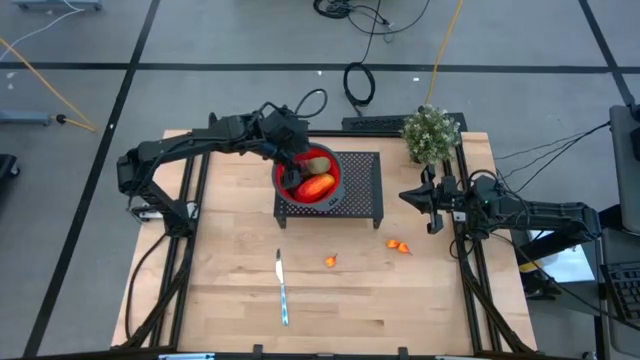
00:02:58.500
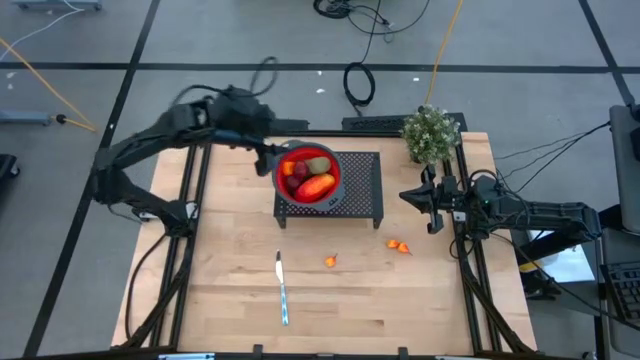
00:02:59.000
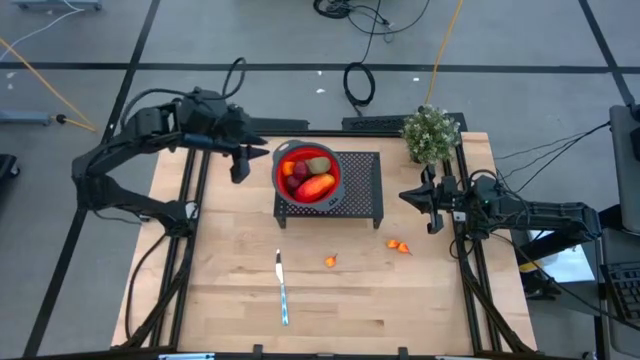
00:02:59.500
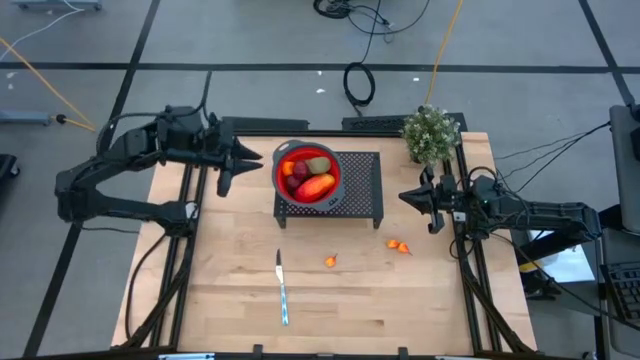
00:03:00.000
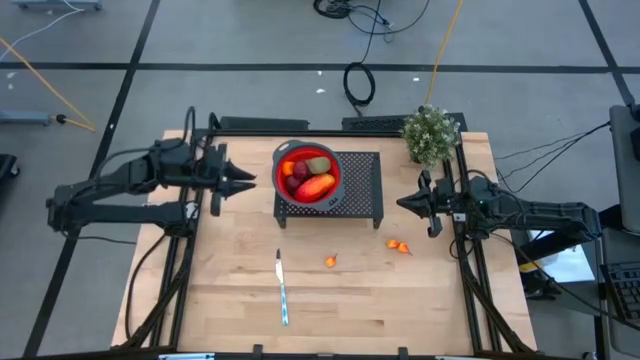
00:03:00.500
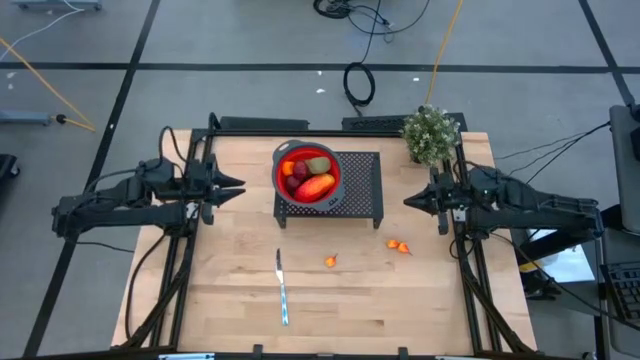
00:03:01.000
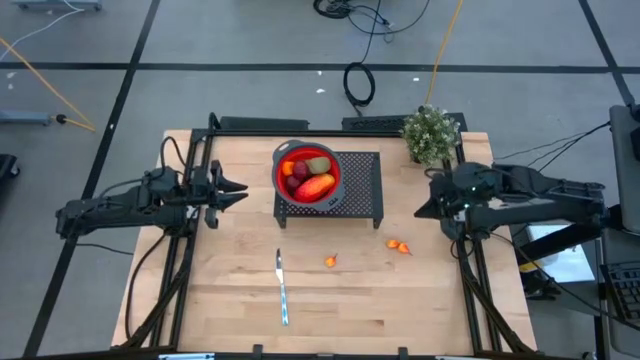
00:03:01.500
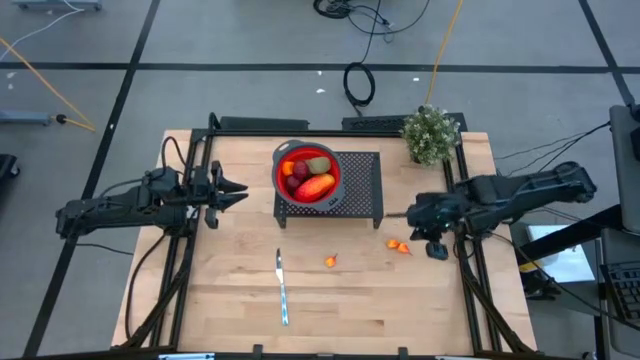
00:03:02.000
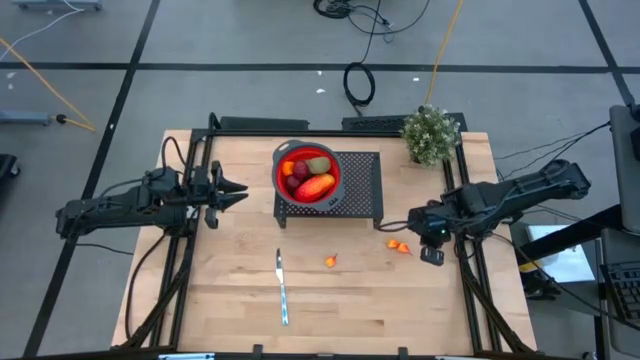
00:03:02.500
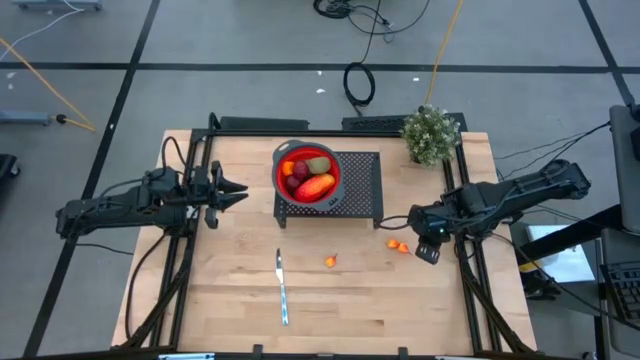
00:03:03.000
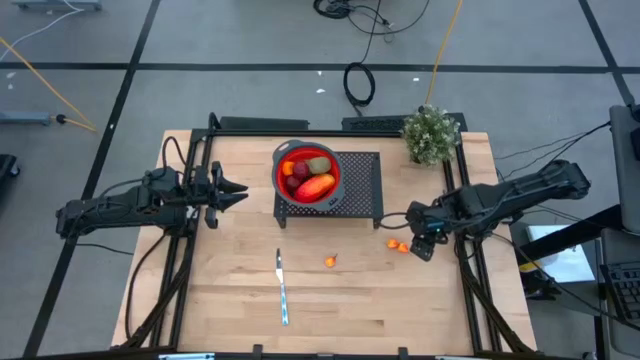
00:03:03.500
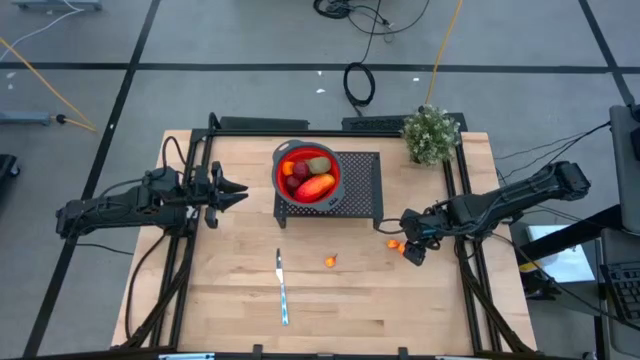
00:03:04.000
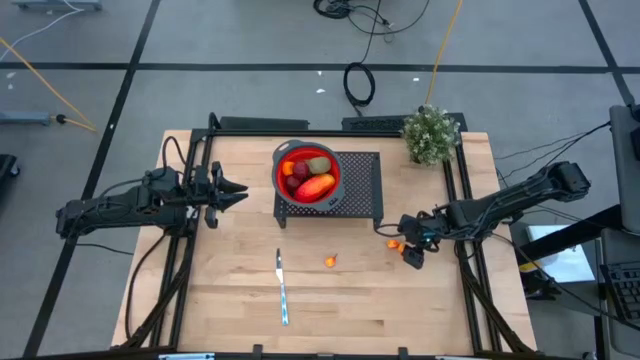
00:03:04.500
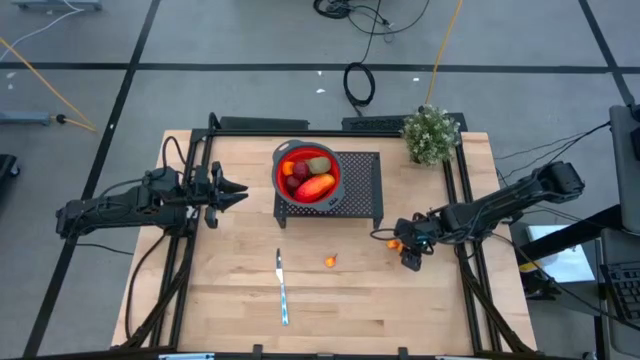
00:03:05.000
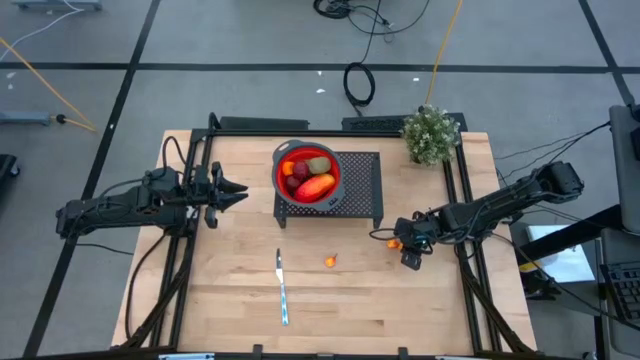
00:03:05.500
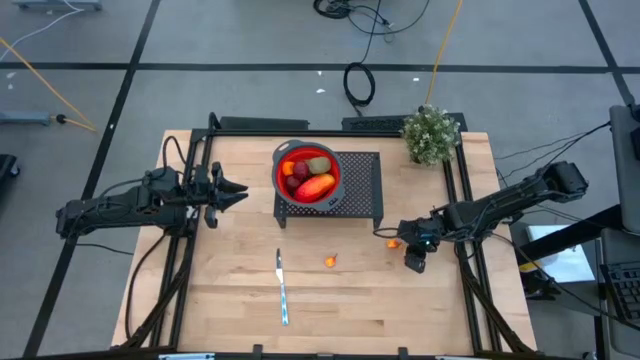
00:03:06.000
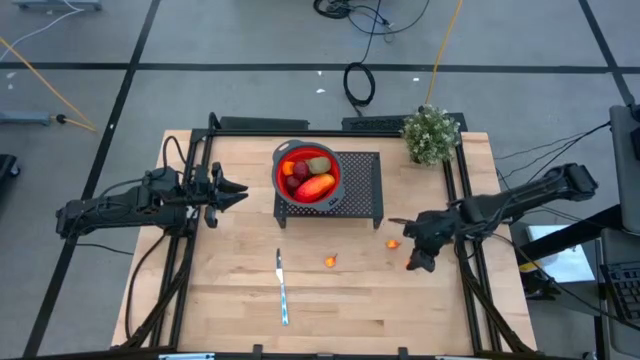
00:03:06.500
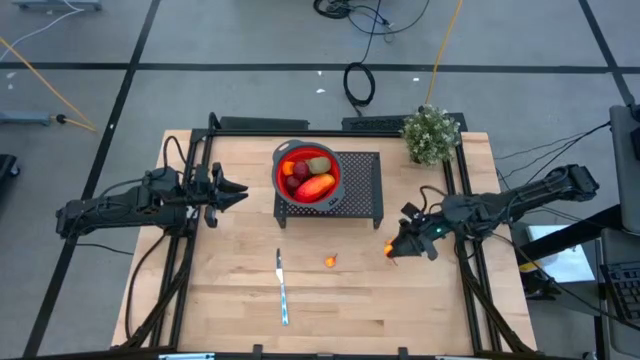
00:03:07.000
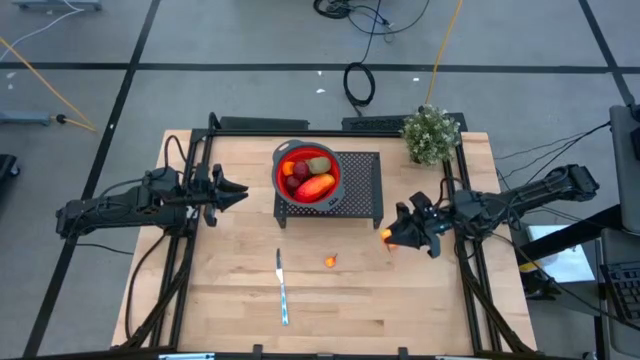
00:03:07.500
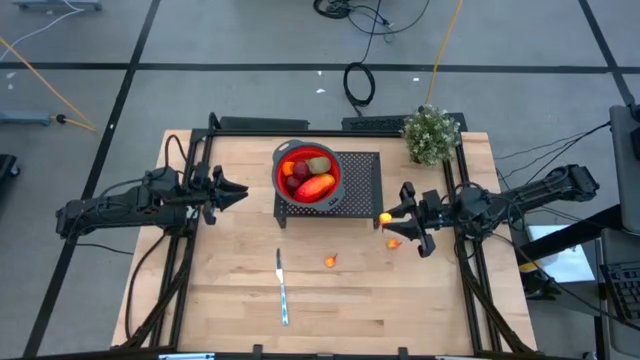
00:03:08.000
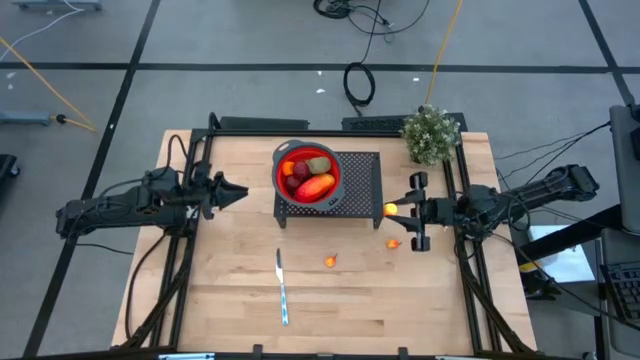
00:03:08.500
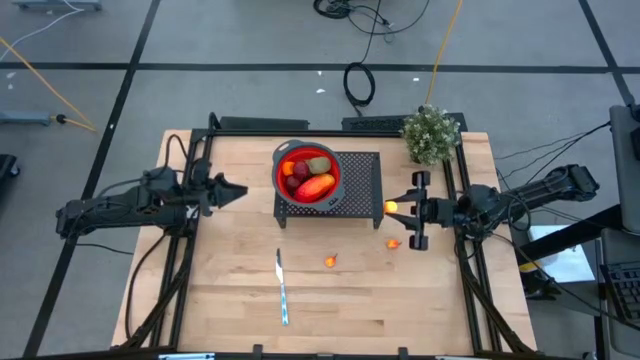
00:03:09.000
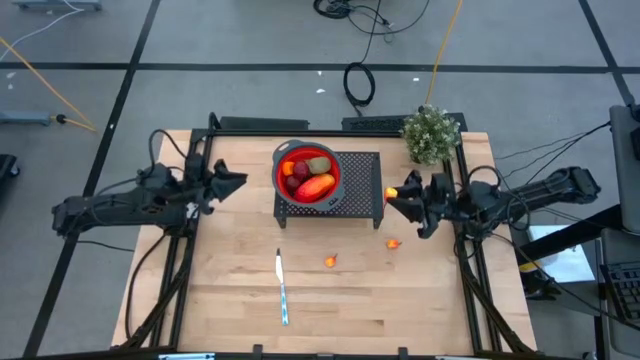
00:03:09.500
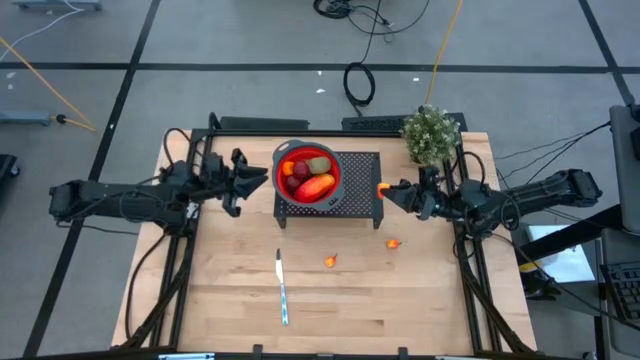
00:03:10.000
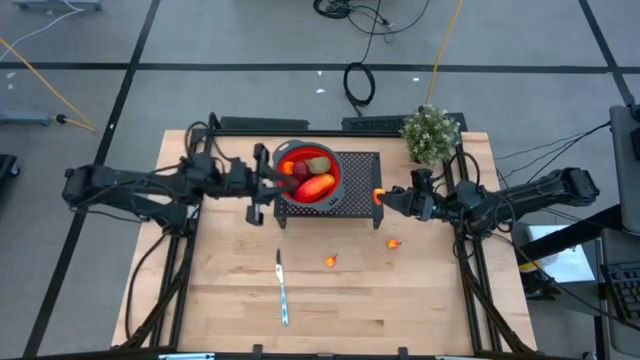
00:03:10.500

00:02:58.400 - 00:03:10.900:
Task: Pick & Place Fruit
Put the top right peach into the strainer on the shelf

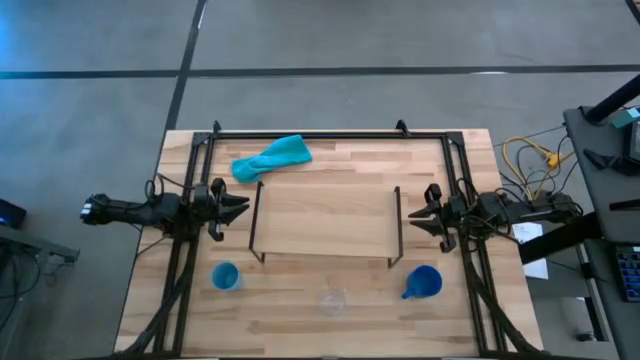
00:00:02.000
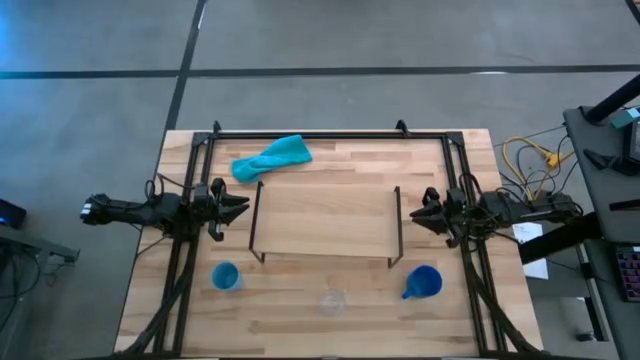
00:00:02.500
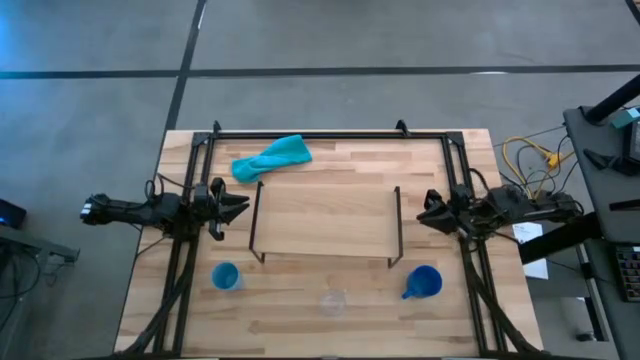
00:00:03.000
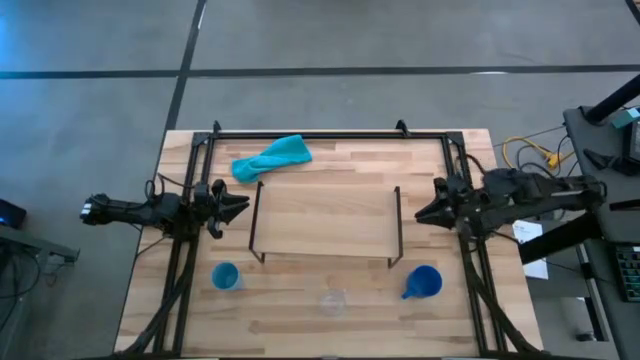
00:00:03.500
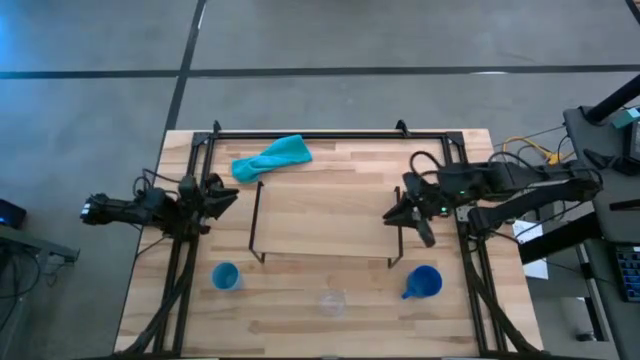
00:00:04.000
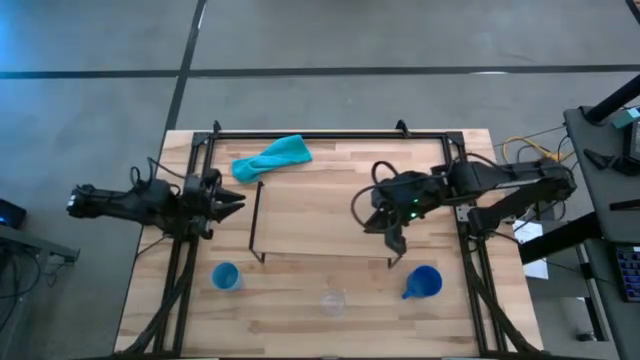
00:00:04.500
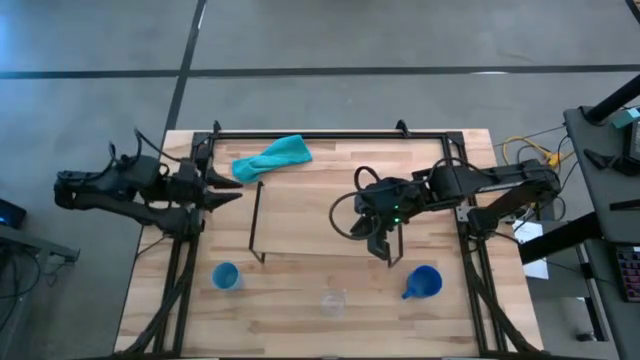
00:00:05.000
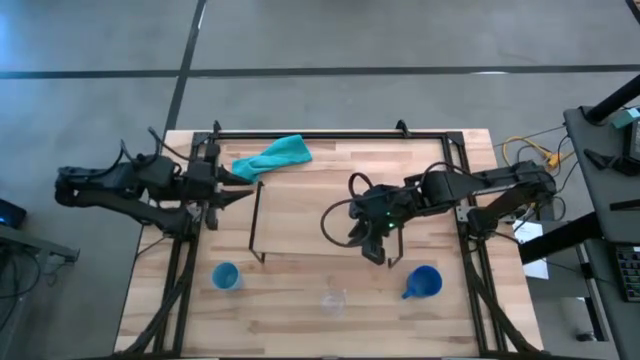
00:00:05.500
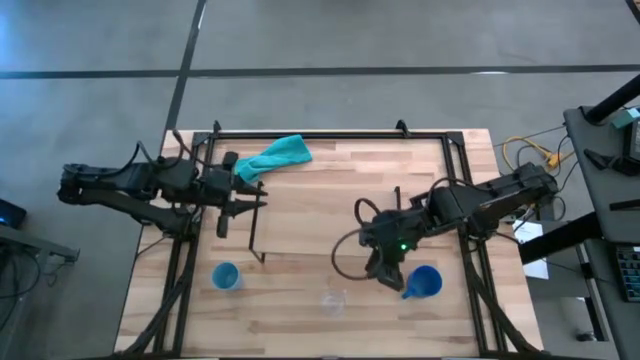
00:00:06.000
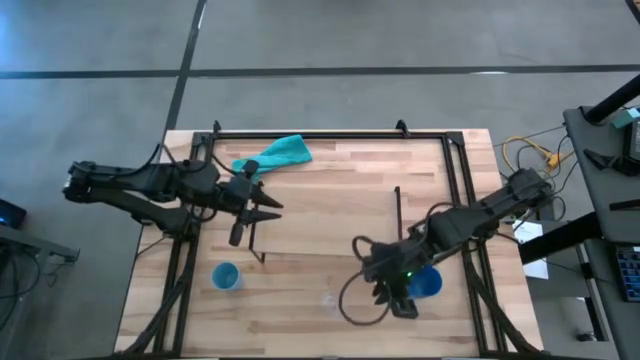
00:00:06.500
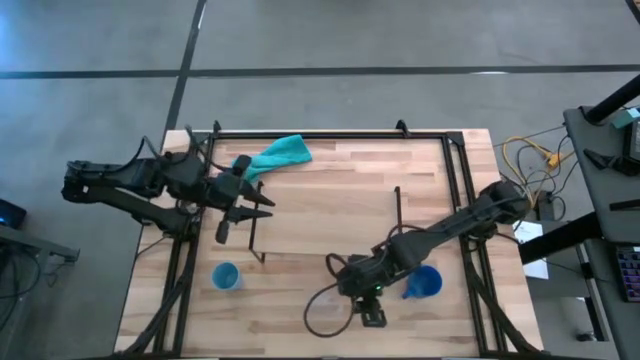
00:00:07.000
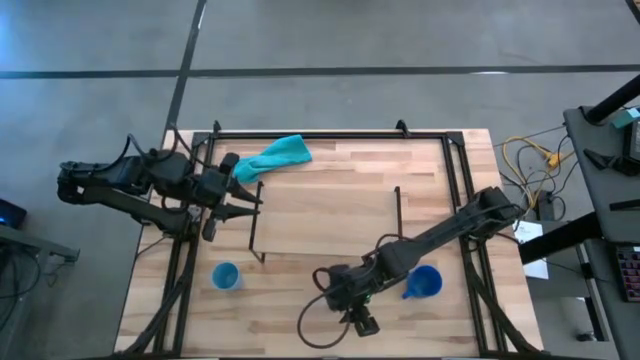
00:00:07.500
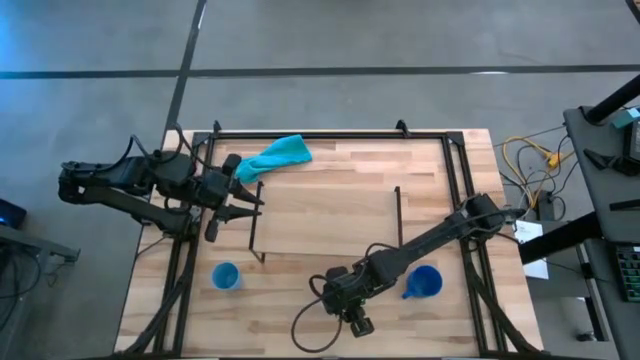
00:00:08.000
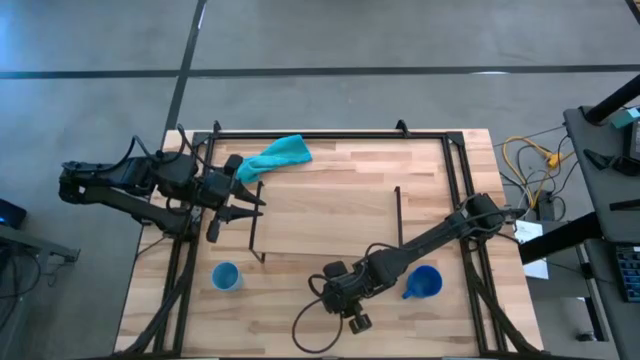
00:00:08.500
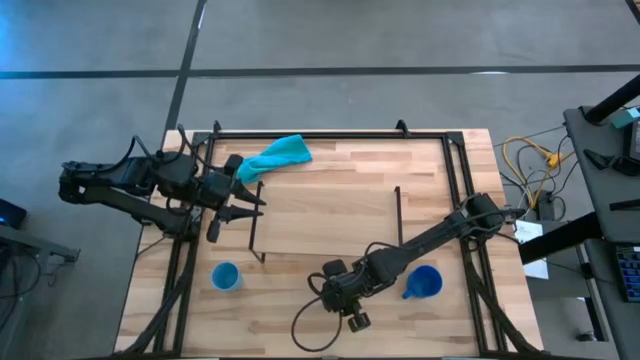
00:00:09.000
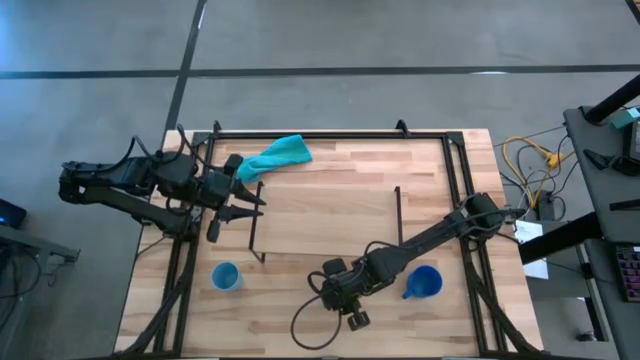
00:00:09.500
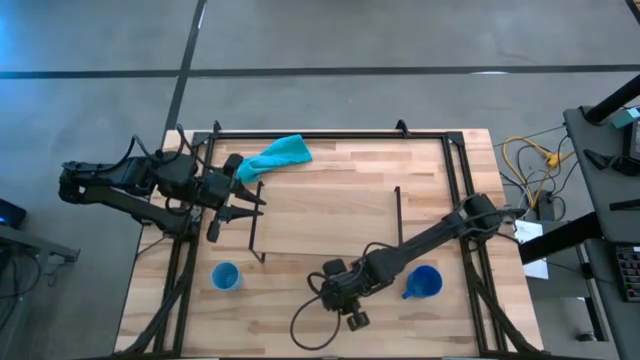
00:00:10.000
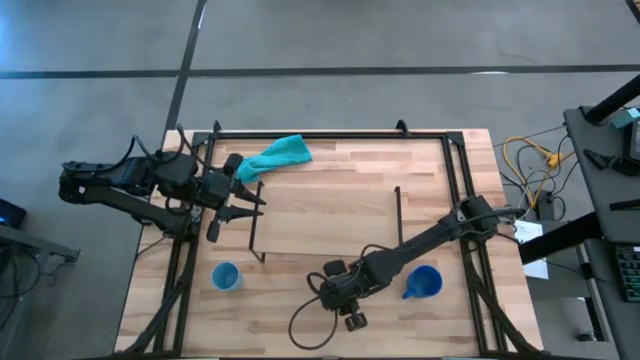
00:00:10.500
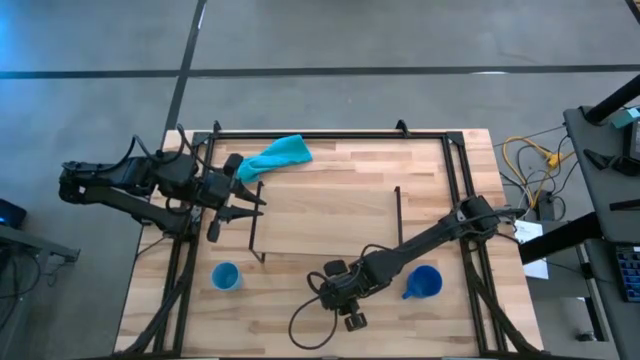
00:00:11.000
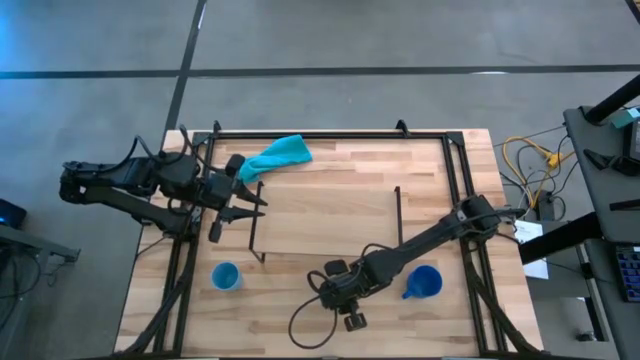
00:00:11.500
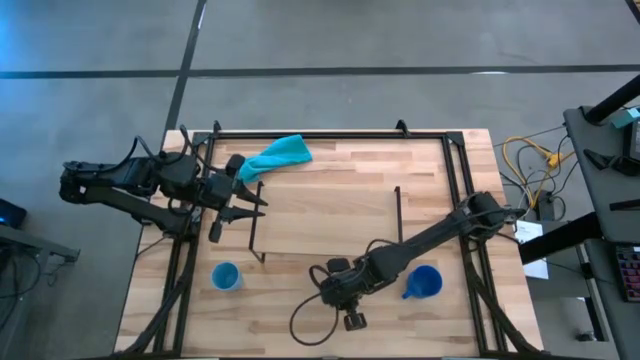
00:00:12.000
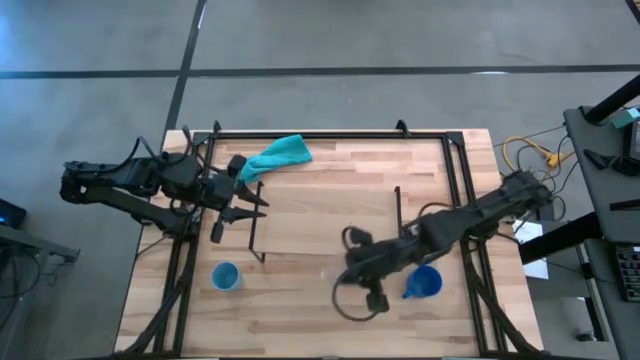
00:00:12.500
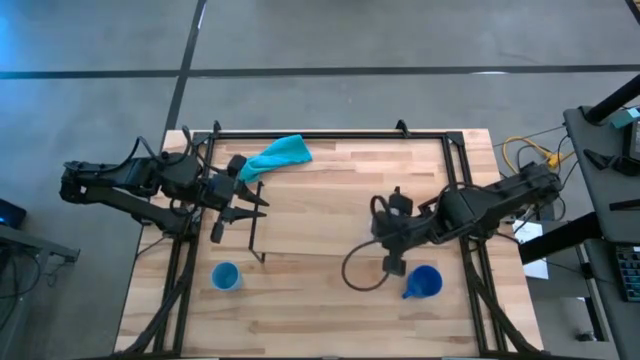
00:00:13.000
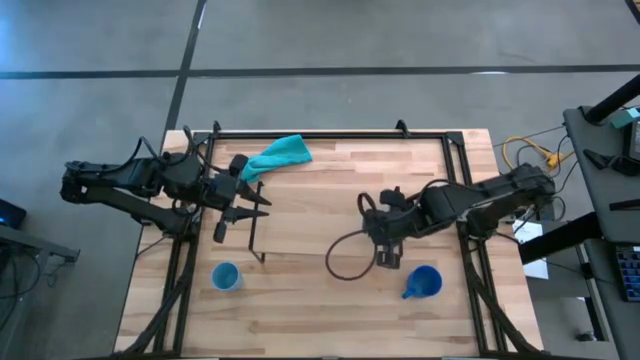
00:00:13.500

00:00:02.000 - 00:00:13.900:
Task: Stack small to large cups/mugs on shelf
Put the transparent cup on the shelf
